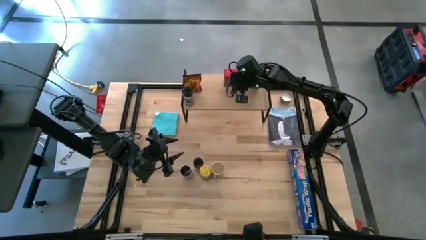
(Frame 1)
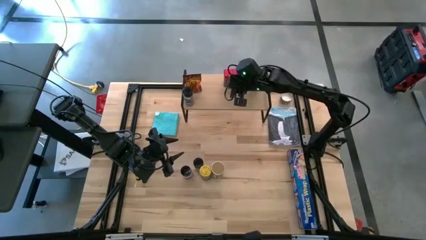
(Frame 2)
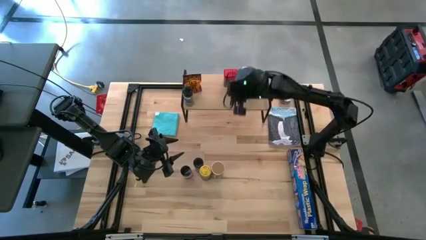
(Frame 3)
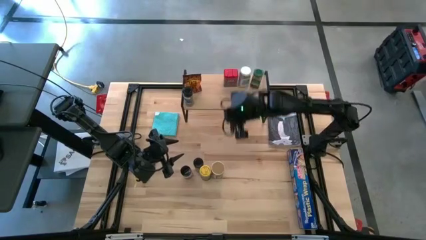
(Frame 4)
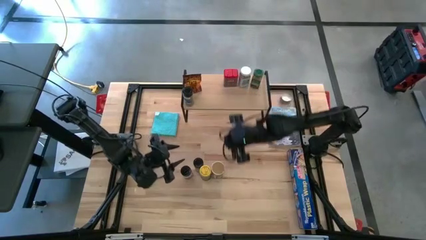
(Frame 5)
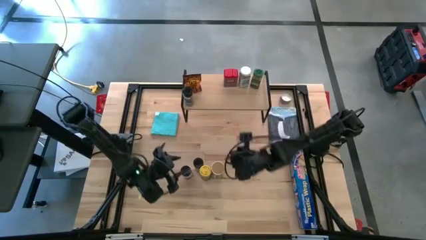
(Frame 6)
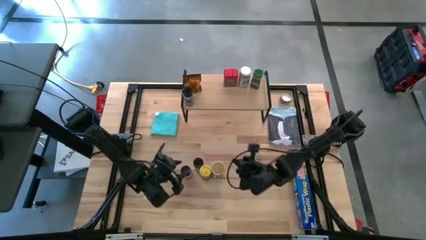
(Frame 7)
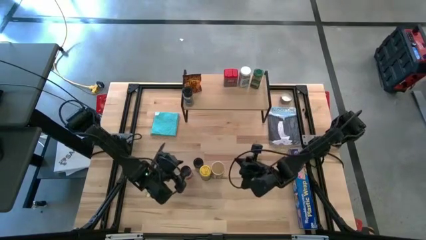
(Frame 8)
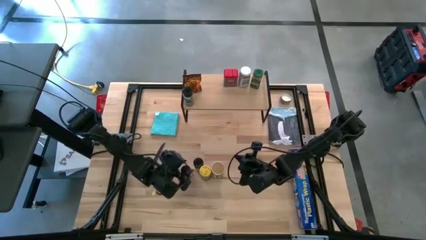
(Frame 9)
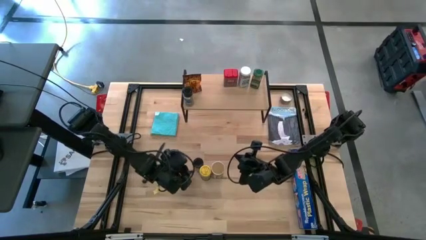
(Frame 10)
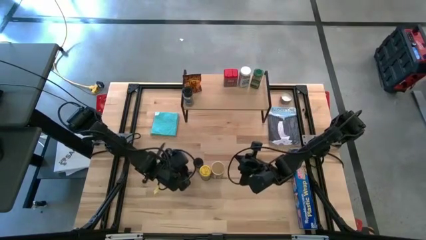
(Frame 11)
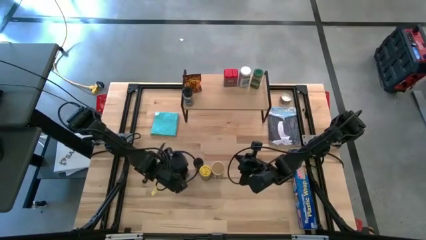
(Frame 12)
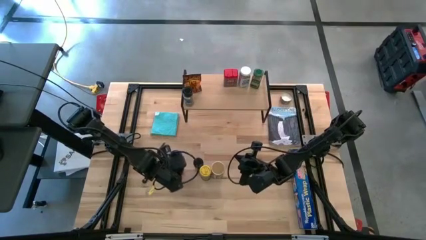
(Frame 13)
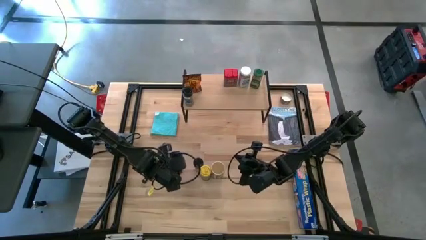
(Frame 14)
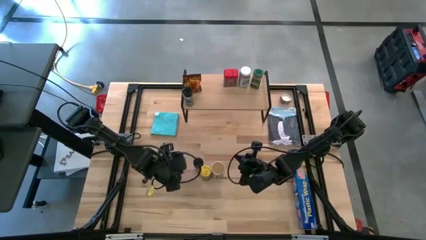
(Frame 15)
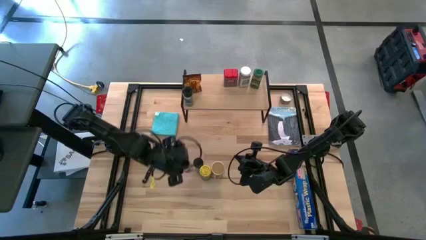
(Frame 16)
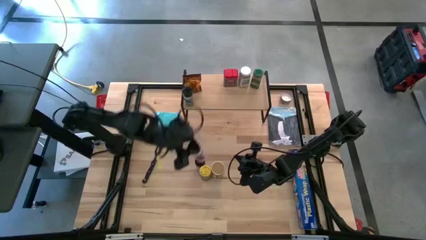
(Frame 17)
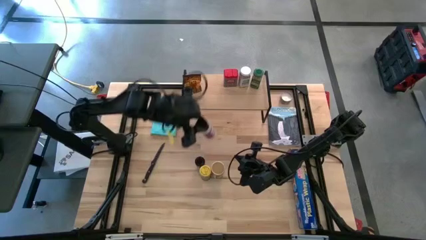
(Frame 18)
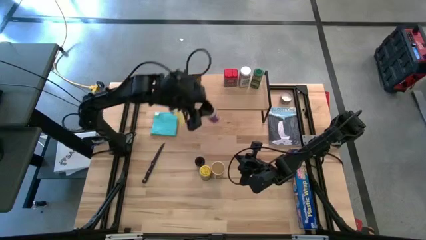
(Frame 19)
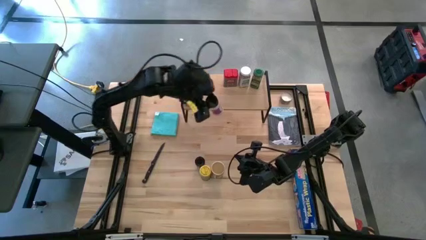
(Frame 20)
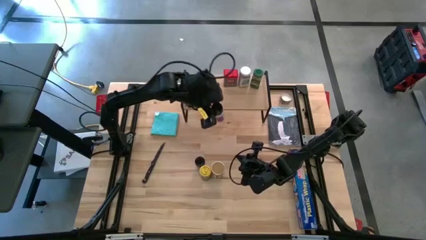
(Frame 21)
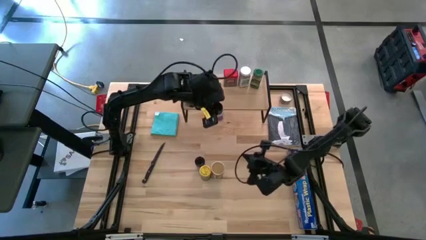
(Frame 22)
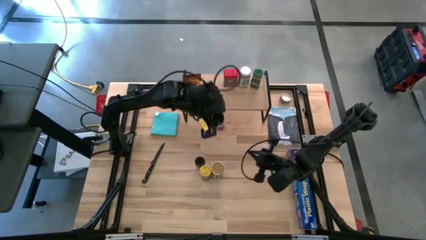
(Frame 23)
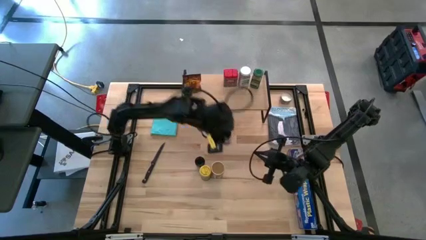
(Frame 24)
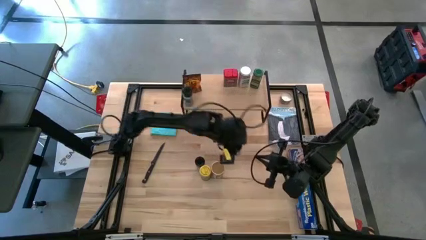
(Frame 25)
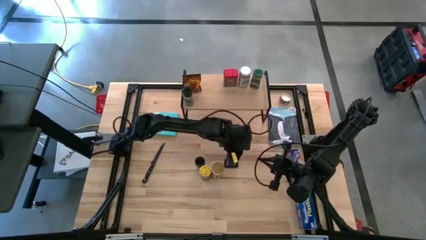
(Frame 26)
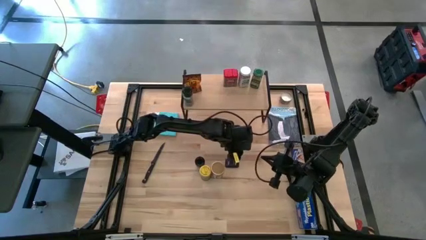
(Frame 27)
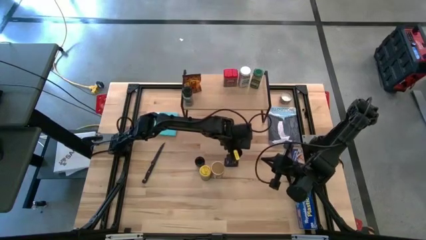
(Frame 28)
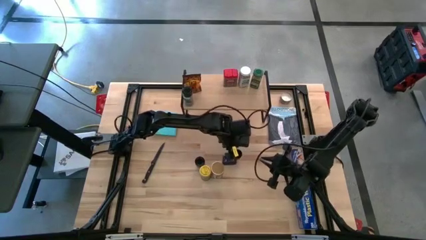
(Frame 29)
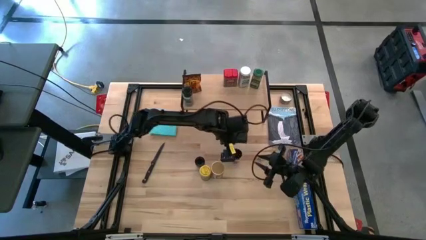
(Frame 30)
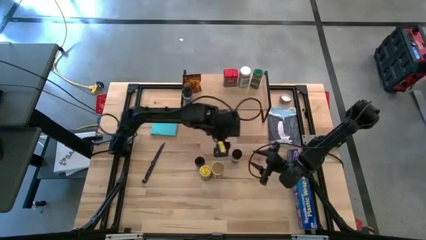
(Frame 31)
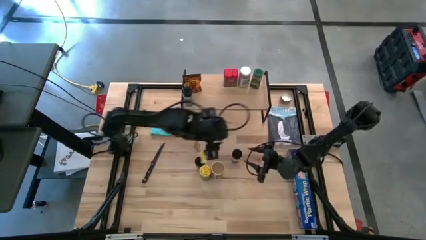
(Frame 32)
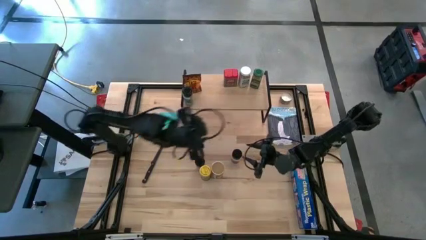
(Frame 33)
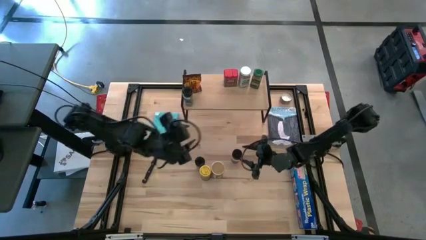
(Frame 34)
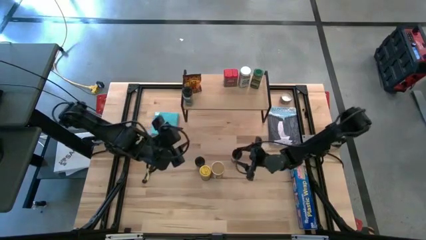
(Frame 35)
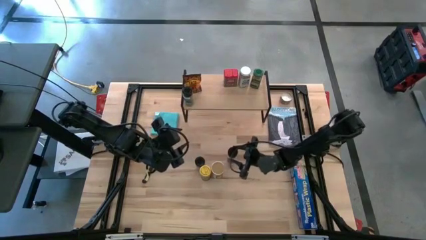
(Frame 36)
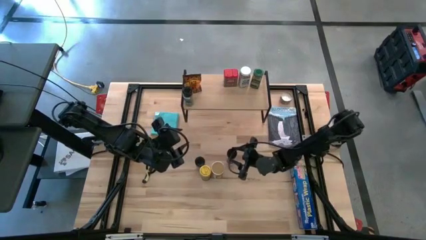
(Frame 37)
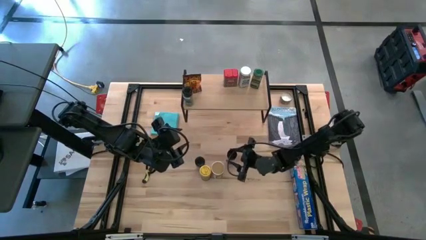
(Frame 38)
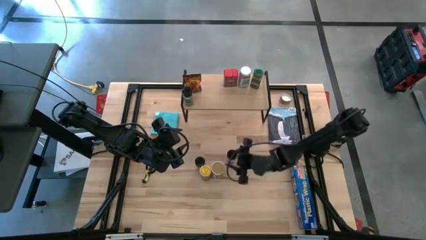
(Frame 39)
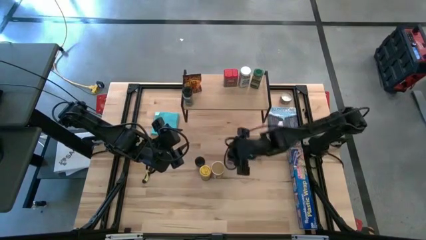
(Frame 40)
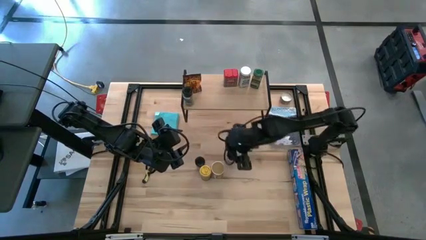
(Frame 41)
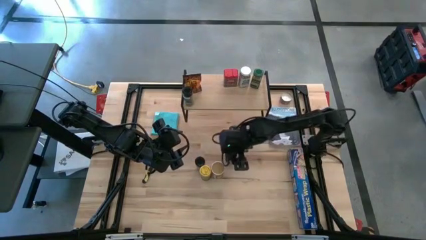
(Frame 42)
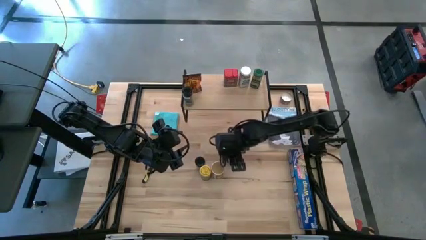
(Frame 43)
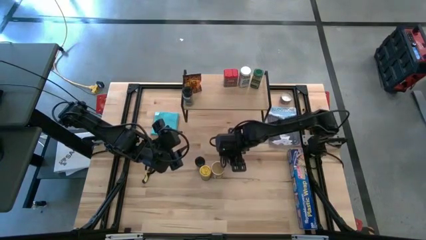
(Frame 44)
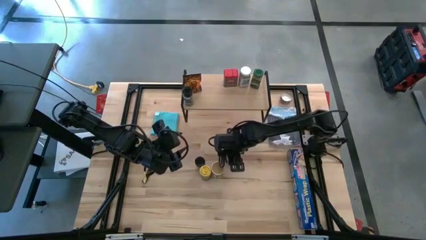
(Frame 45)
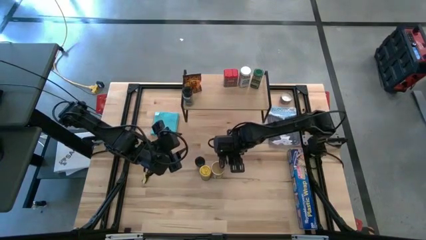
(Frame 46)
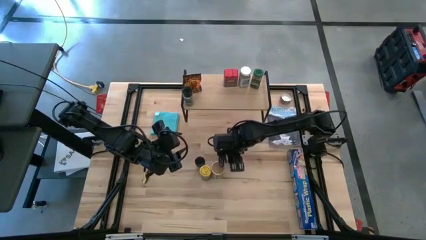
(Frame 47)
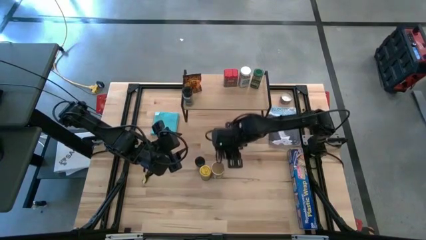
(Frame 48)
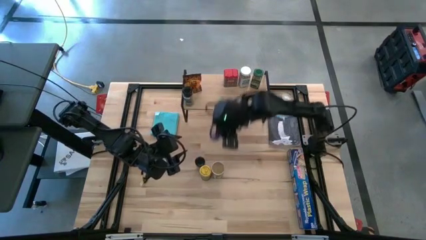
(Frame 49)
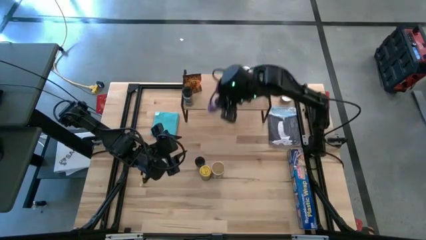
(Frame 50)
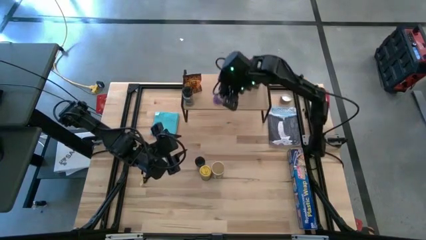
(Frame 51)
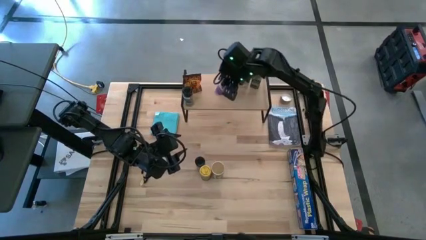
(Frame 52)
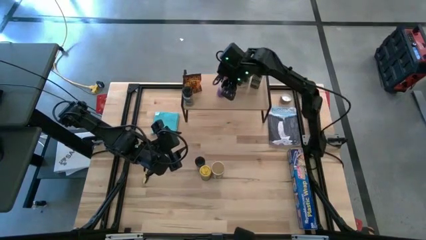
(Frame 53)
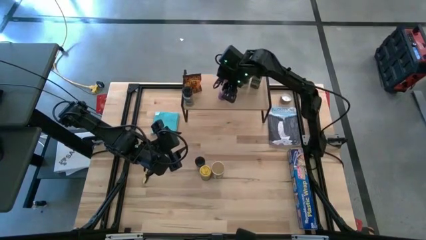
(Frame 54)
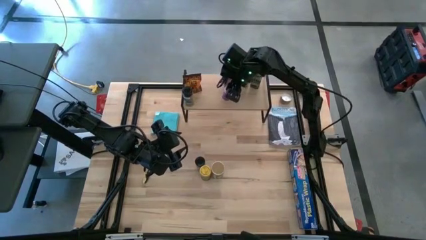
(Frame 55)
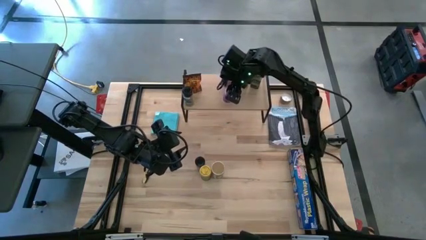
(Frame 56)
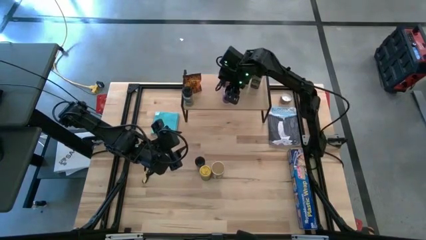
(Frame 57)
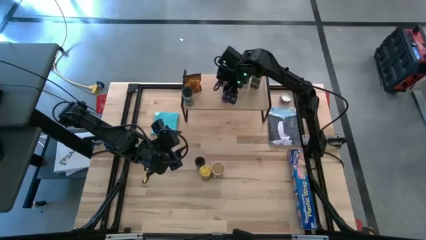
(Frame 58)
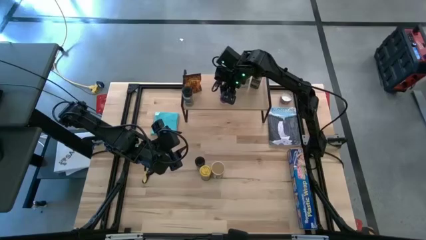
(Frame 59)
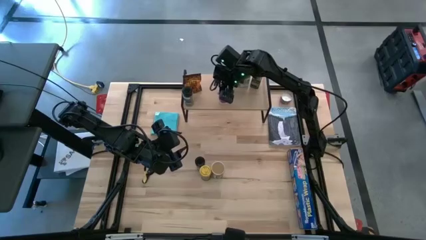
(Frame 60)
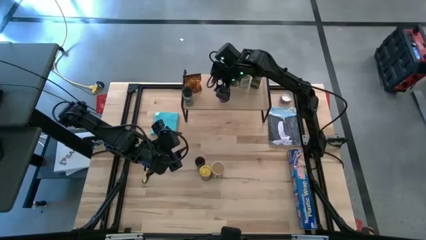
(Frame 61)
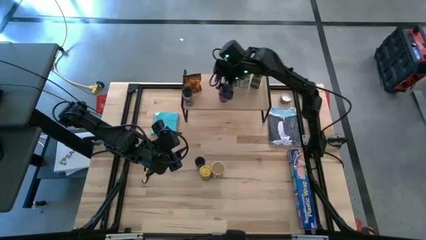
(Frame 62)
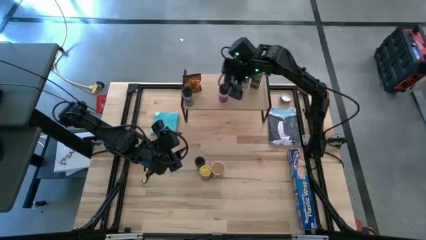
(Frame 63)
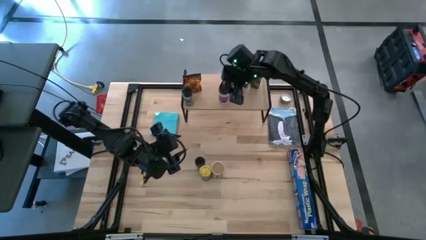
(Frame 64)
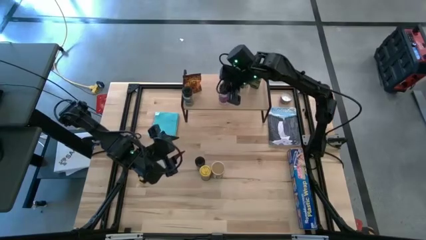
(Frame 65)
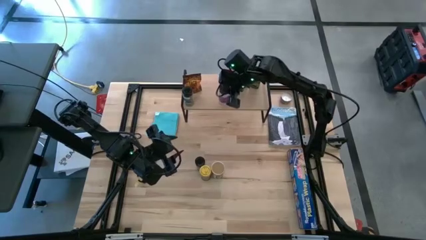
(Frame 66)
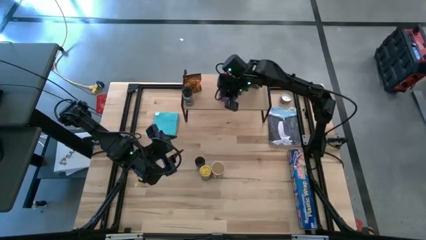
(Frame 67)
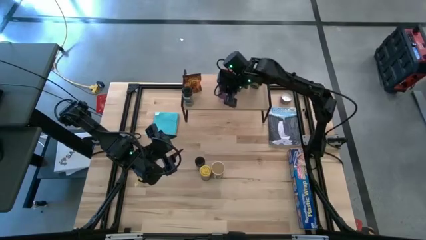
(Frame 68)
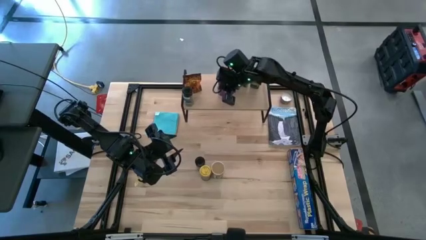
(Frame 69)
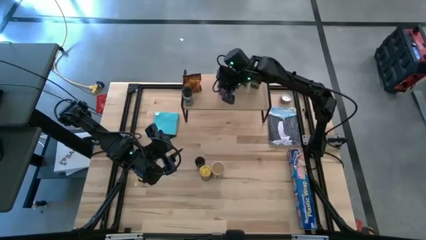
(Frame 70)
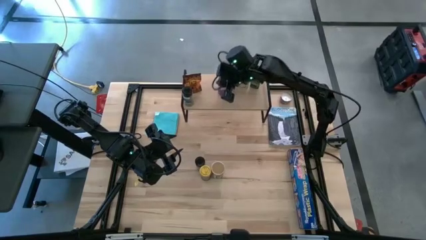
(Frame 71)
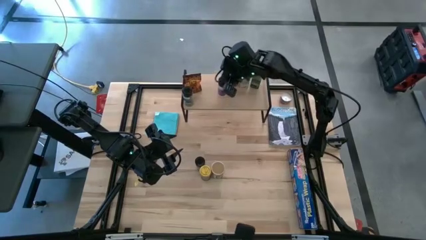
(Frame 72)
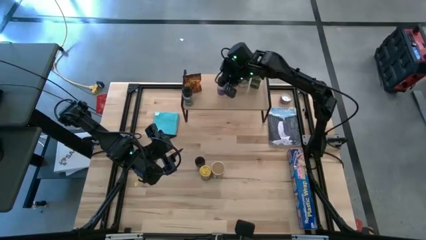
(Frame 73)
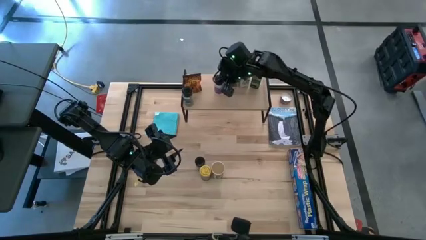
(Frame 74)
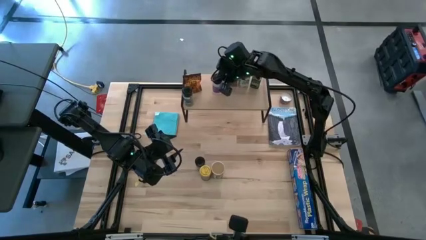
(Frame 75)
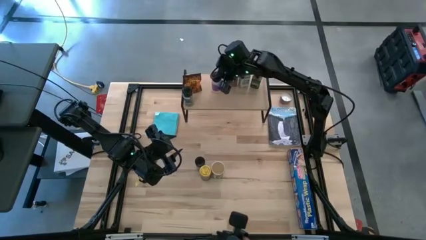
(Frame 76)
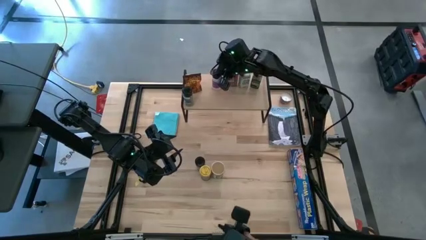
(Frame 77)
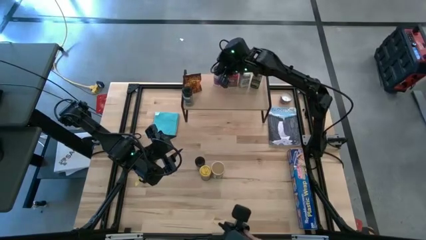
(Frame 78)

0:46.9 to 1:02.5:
Task: Shelf spices
Put the left black seasoning bottle on the shelf
